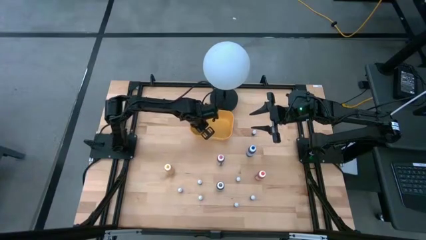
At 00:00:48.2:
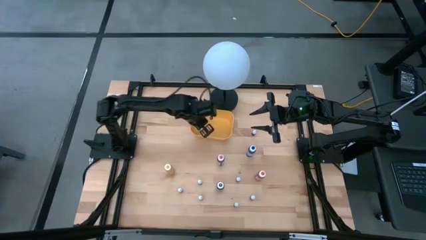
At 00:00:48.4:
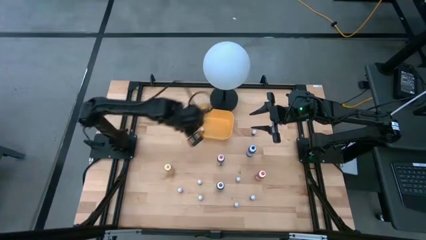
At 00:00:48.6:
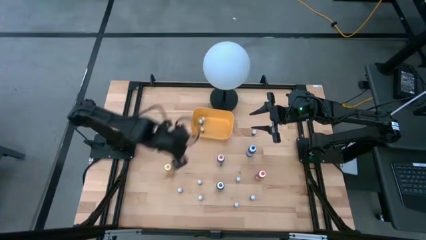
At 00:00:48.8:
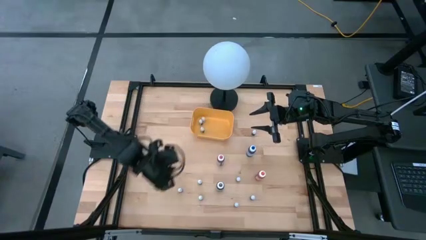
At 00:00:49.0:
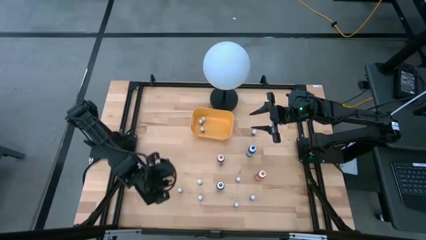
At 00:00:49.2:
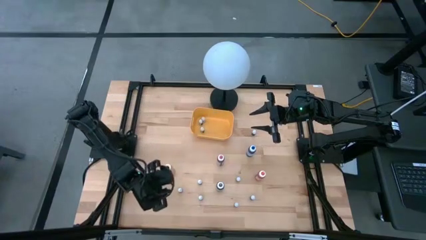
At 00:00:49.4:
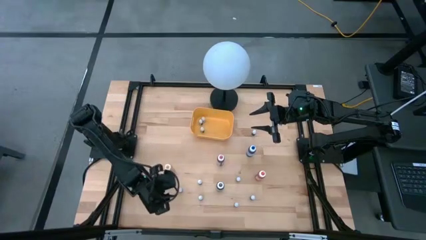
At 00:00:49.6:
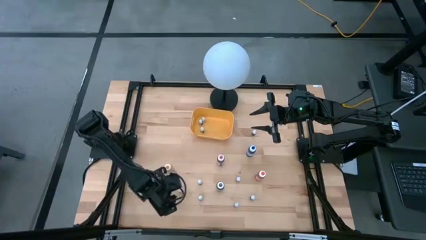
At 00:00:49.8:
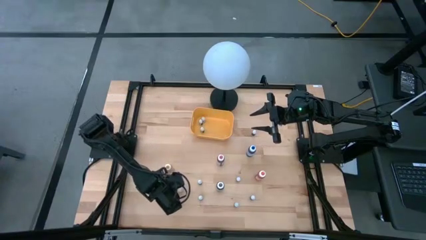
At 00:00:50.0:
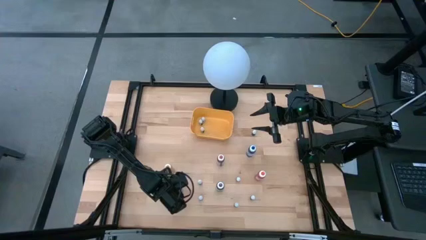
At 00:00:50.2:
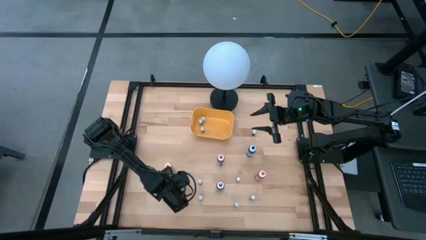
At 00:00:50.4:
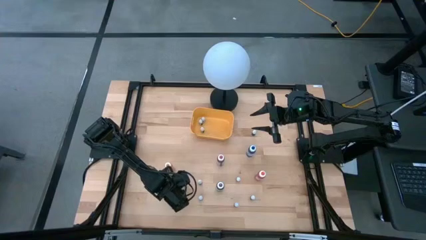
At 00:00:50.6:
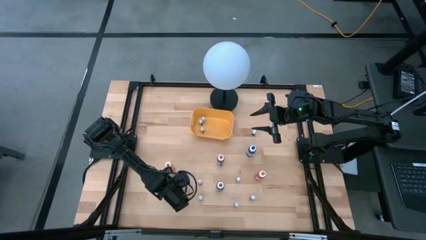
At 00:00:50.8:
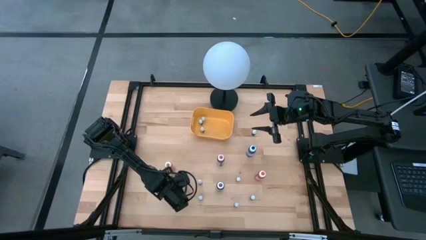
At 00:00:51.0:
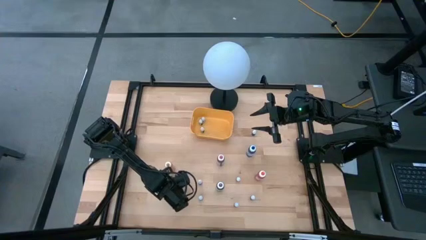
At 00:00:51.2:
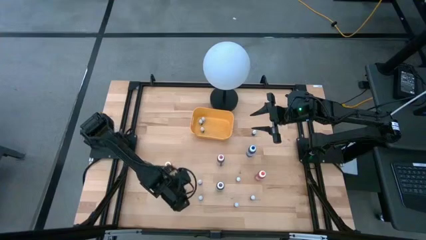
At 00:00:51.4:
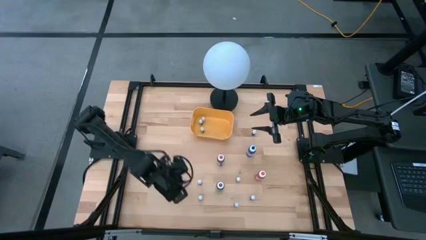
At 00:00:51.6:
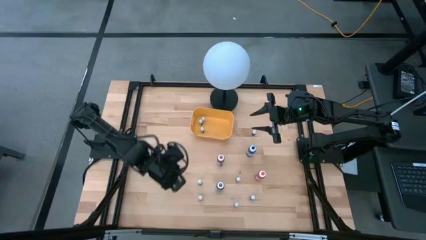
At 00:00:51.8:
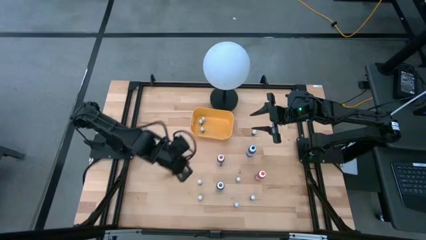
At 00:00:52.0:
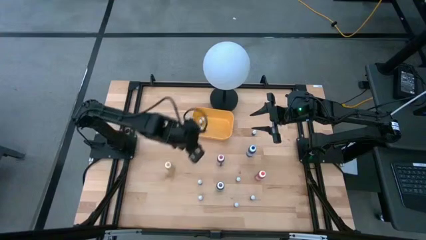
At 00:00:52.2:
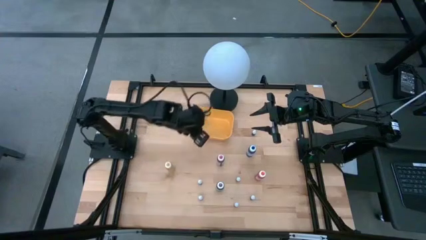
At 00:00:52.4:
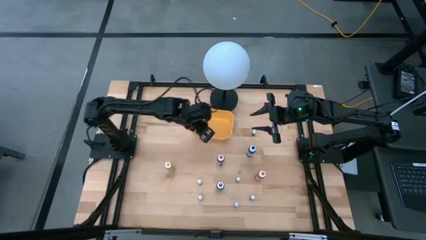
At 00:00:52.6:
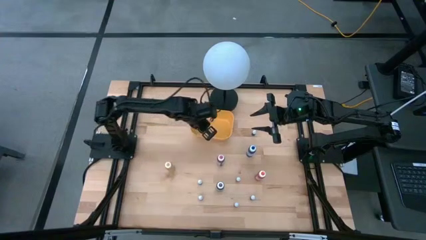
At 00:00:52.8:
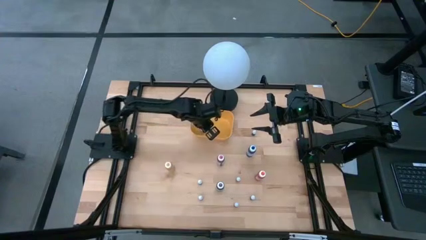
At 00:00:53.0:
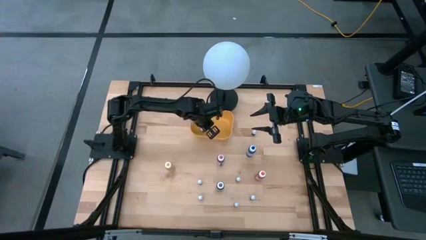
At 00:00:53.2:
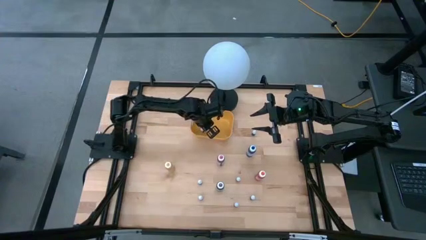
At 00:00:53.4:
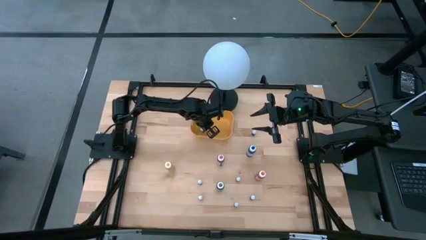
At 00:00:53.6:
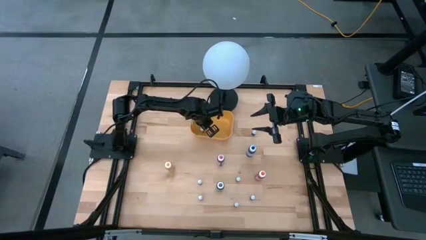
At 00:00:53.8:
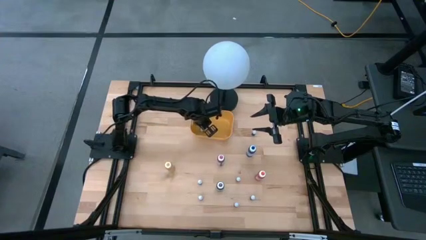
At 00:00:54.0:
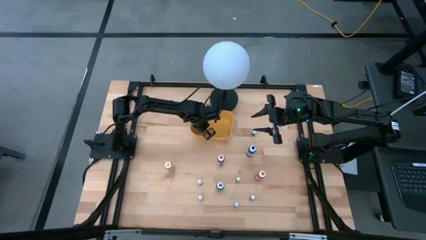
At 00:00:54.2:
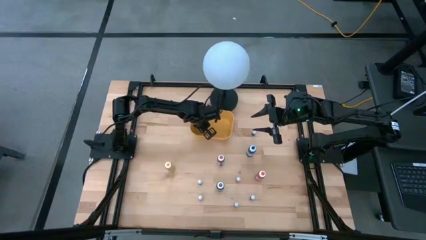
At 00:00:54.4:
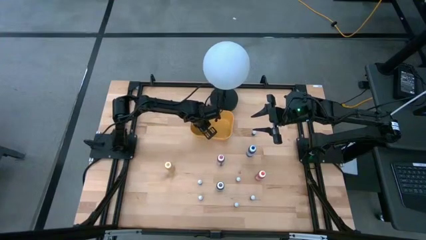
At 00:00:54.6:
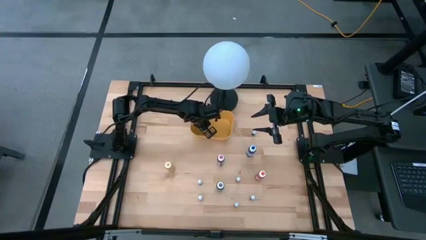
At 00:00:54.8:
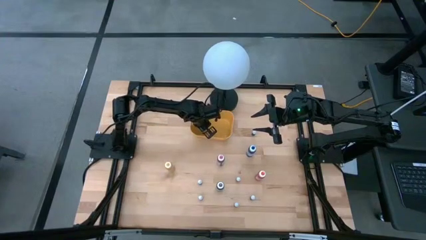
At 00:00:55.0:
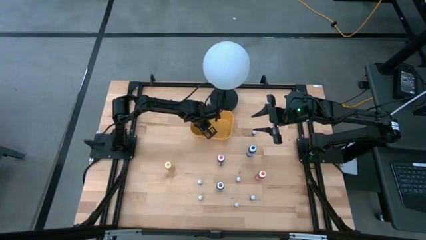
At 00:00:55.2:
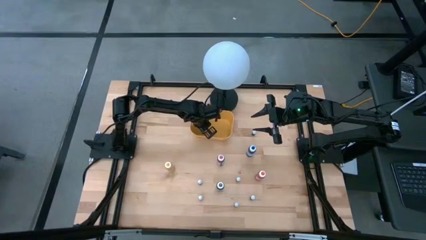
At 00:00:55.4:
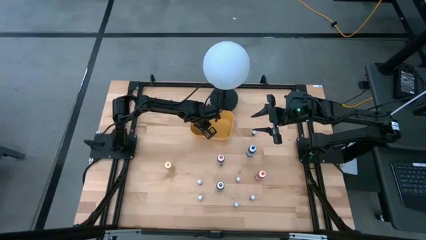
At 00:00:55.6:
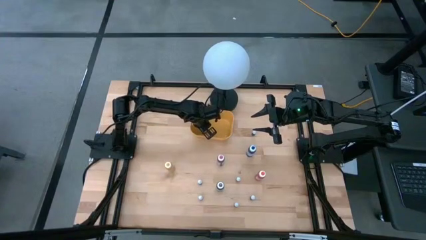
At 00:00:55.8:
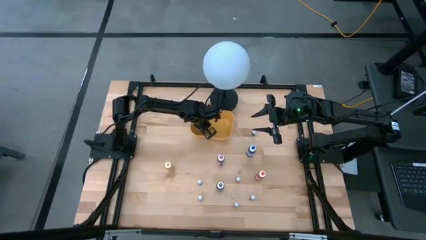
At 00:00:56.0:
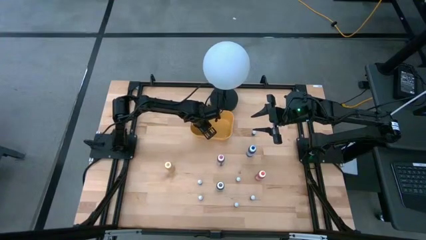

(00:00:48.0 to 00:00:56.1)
Task: Pick & Place food coloring
Put the small pink food coloring bottle into the yellow bin

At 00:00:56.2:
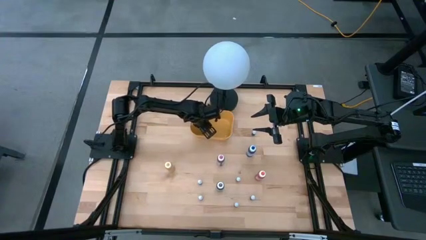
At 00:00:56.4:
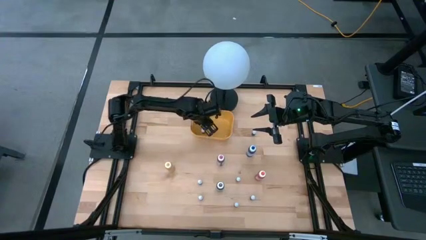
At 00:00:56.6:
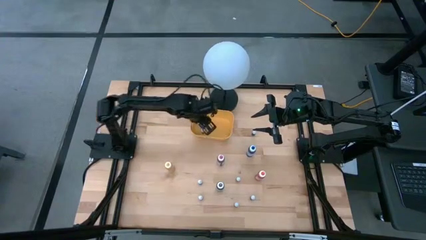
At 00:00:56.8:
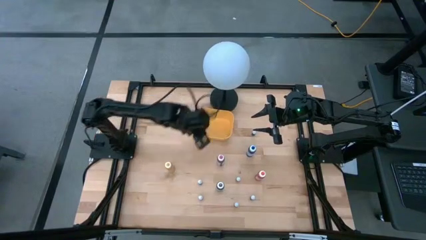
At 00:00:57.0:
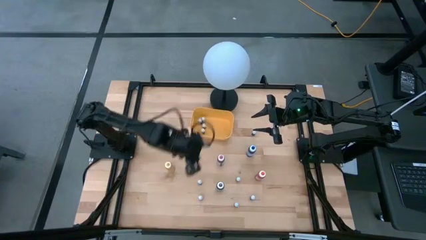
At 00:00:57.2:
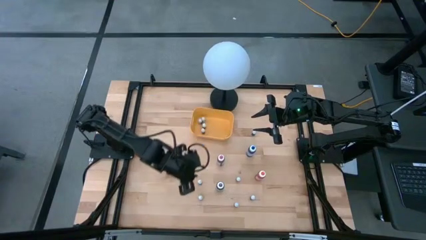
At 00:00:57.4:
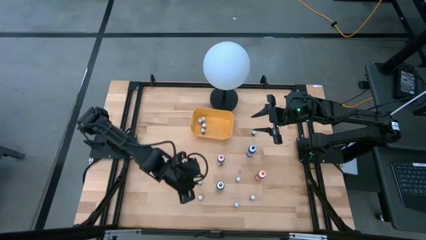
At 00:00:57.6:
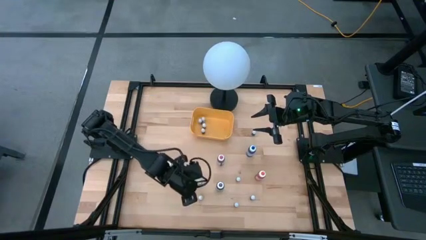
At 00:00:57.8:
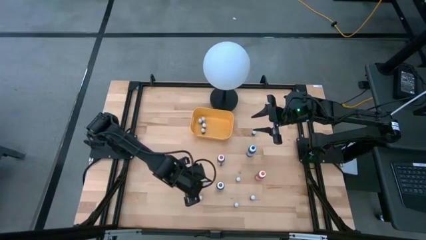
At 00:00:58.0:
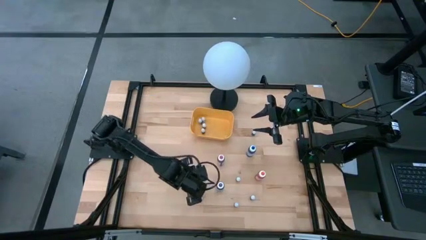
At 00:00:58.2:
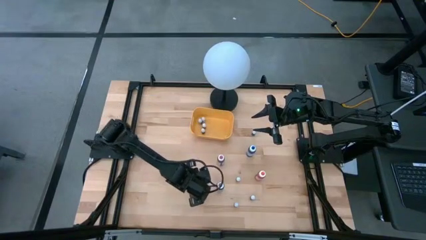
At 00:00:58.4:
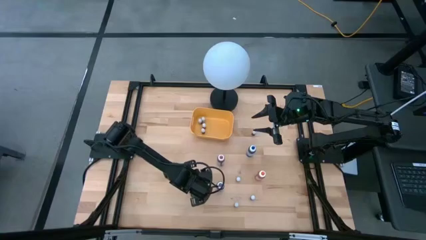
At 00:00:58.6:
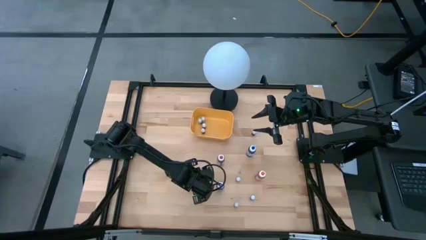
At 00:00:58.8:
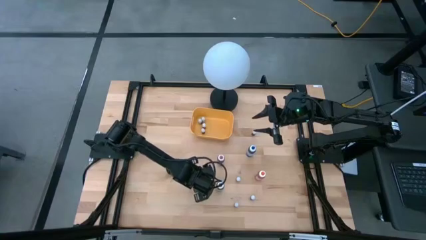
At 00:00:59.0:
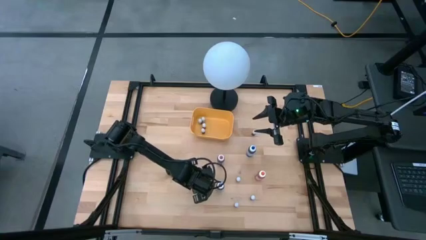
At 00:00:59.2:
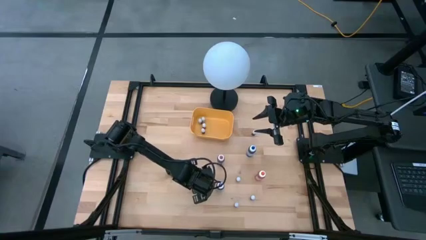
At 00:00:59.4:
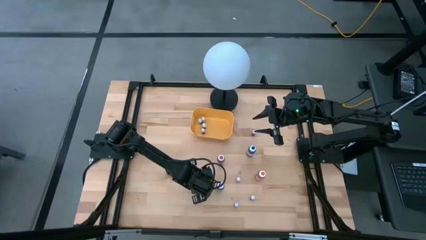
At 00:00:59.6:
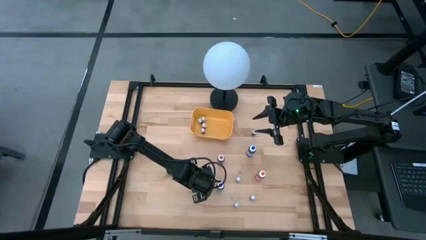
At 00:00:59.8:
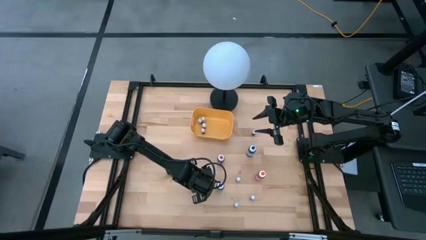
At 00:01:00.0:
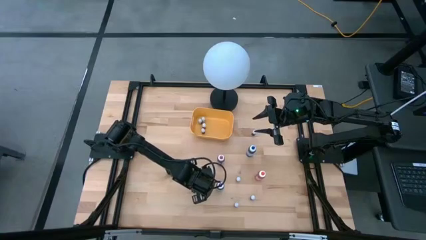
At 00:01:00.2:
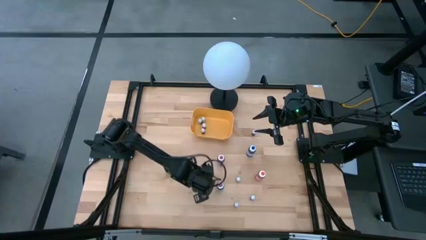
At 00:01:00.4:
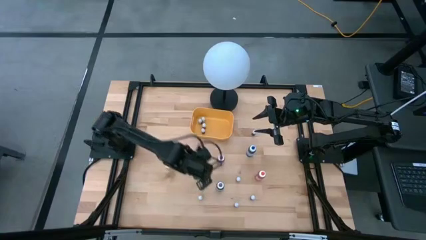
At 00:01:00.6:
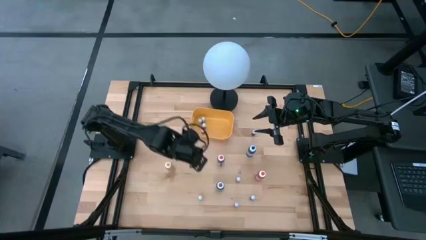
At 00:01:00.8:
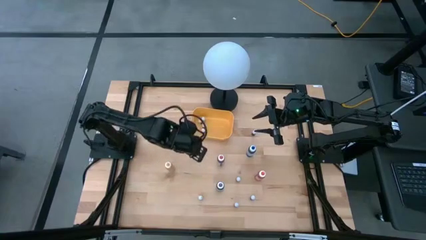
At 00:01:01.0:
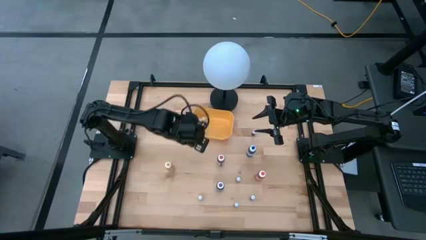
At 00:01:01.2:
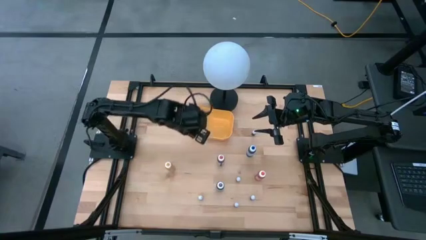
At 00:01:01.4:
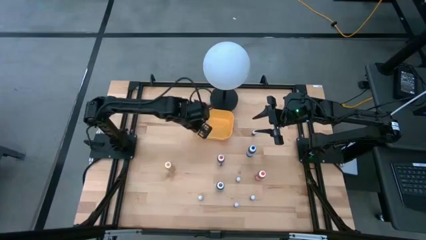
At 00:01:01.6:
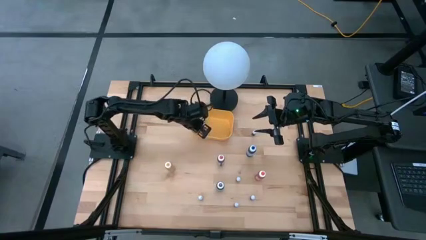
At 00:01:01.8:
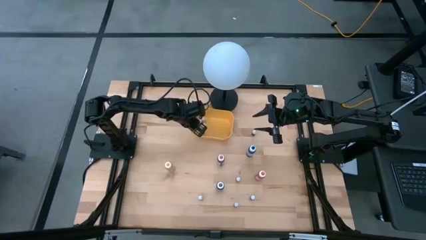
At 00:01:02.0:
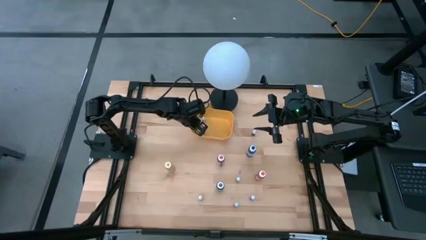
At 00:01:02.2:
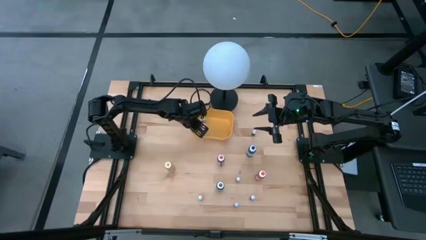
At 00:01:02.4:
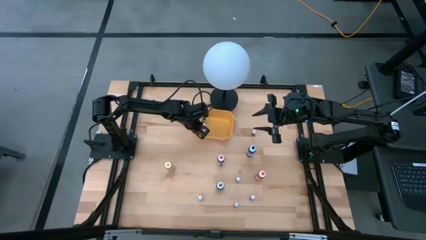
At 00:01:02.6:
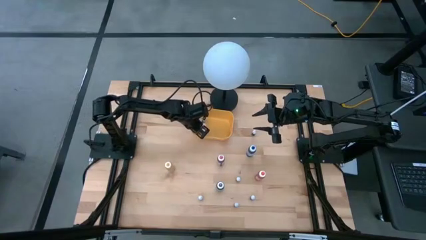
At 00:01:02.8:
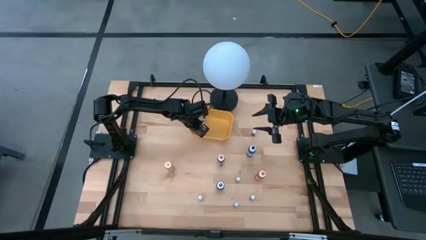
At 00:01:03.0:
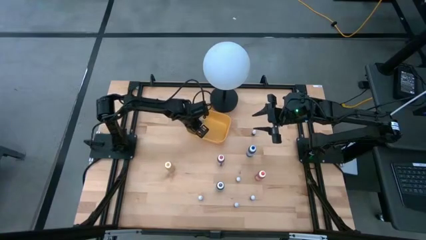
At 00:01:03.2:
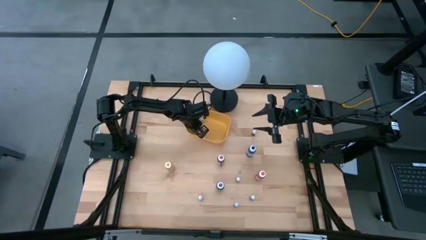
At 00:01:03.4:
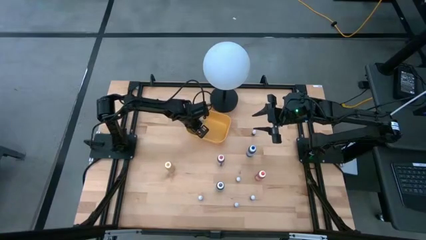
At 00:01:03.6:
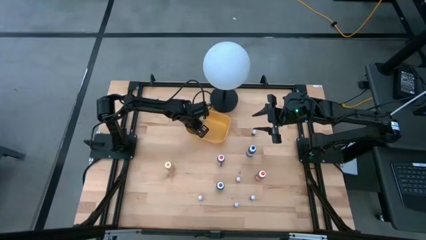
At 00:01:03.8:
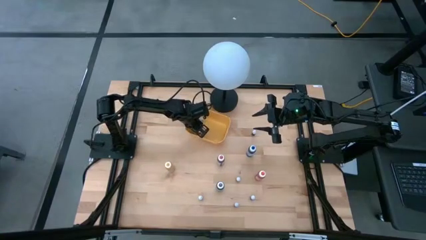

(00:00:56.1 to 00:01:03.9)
Put the left small red food coloring bottle into the yellow bin
